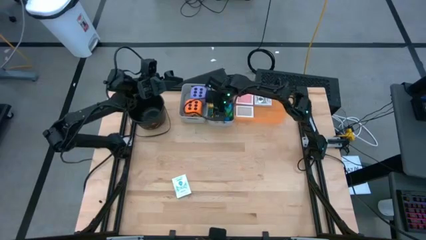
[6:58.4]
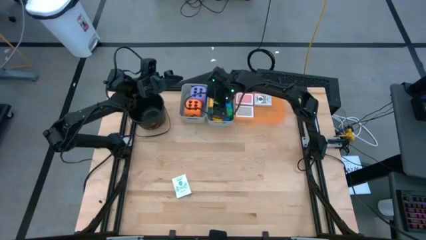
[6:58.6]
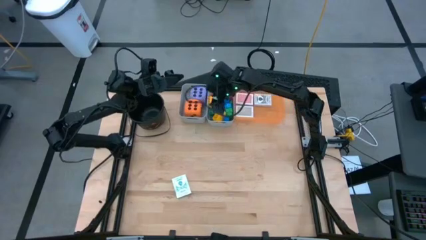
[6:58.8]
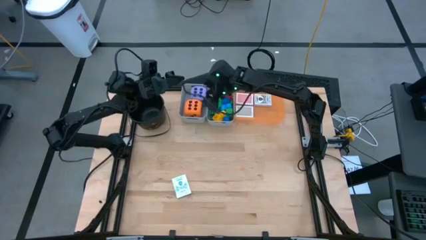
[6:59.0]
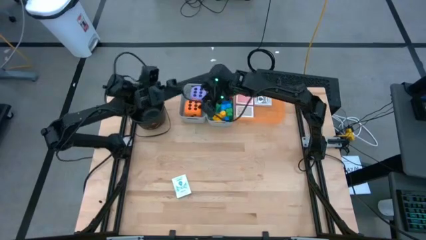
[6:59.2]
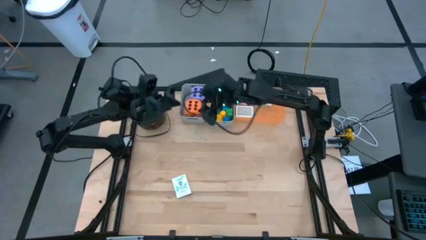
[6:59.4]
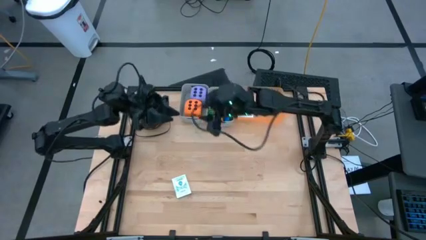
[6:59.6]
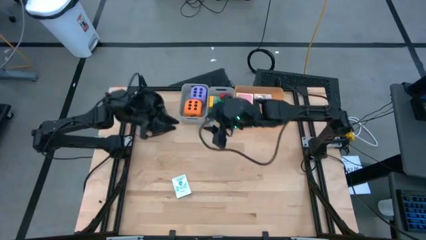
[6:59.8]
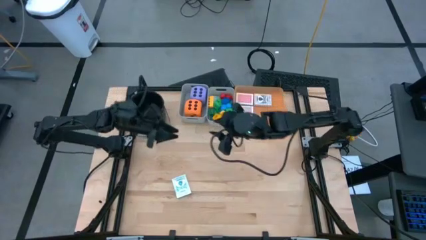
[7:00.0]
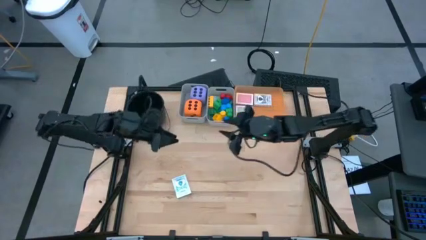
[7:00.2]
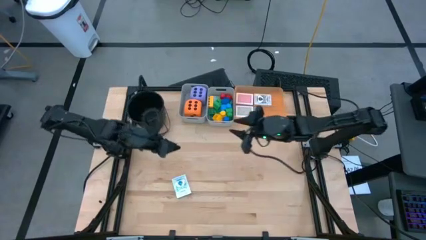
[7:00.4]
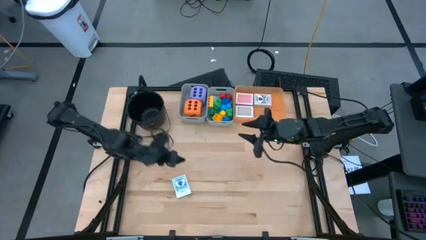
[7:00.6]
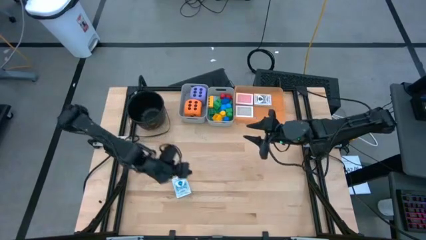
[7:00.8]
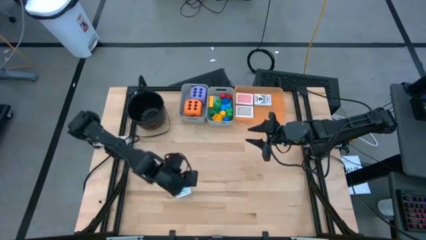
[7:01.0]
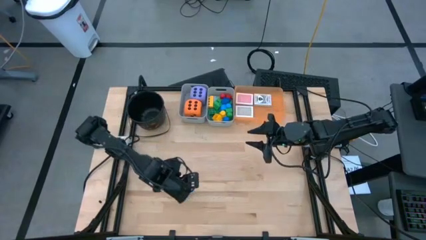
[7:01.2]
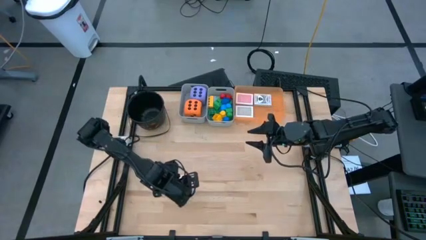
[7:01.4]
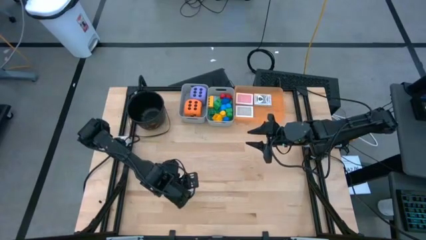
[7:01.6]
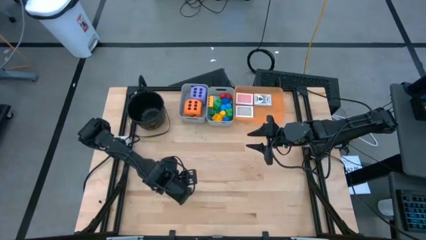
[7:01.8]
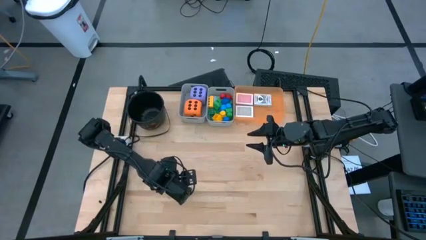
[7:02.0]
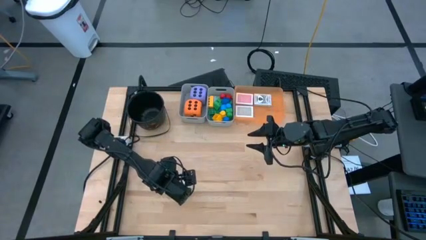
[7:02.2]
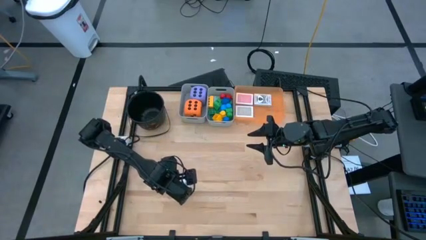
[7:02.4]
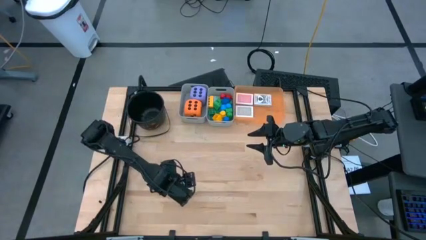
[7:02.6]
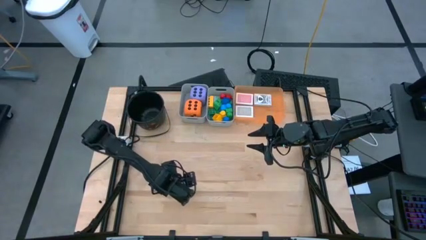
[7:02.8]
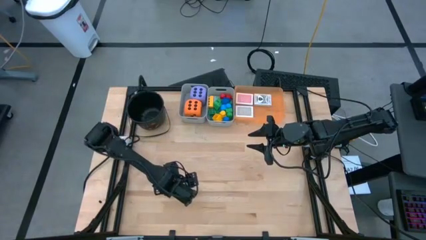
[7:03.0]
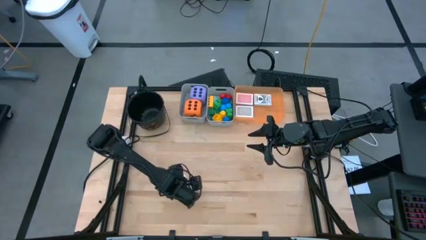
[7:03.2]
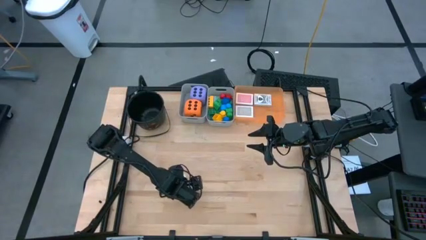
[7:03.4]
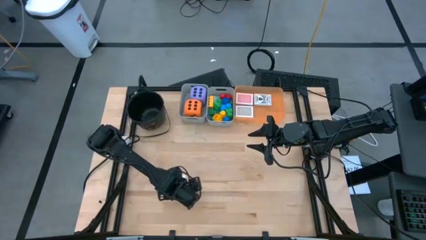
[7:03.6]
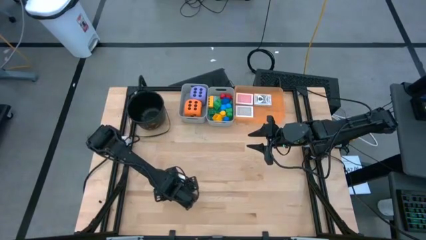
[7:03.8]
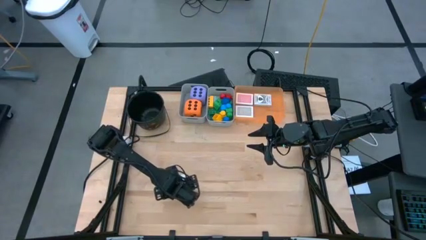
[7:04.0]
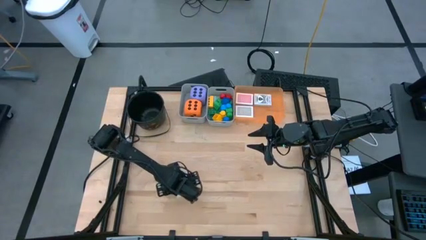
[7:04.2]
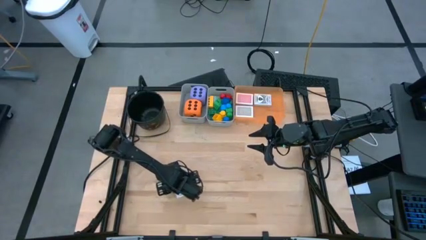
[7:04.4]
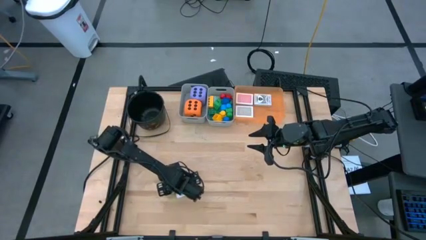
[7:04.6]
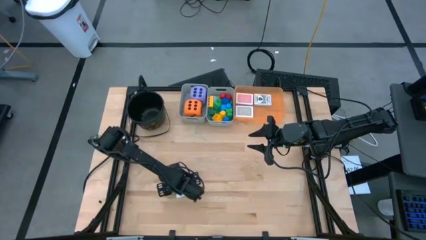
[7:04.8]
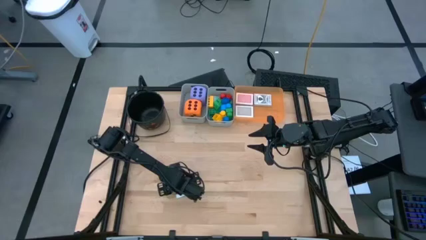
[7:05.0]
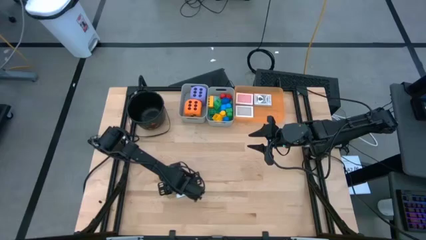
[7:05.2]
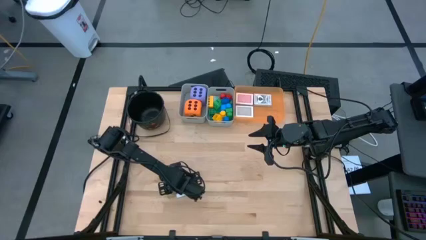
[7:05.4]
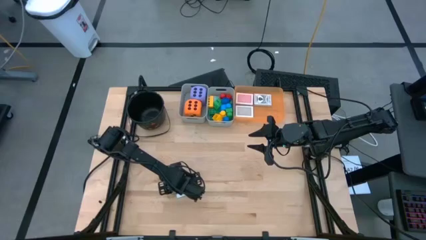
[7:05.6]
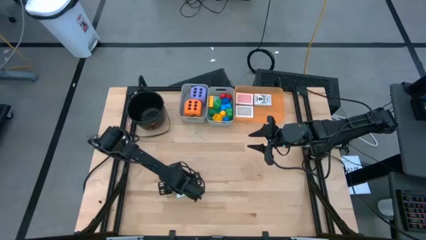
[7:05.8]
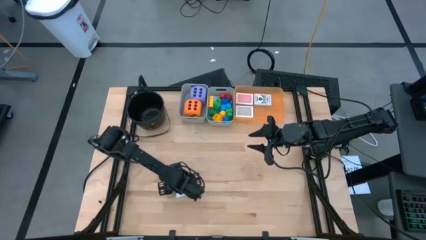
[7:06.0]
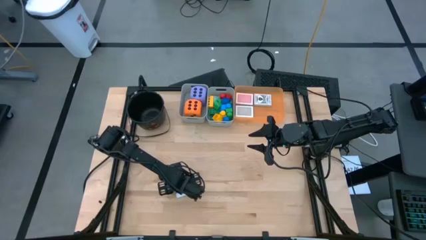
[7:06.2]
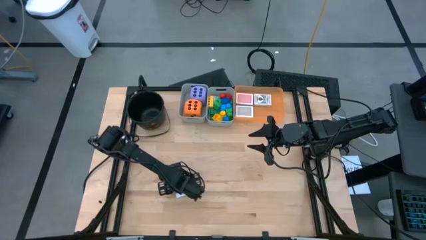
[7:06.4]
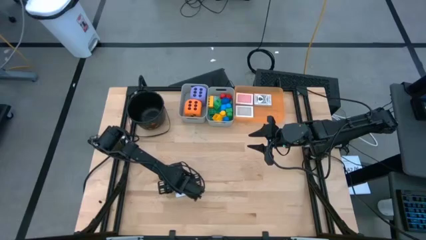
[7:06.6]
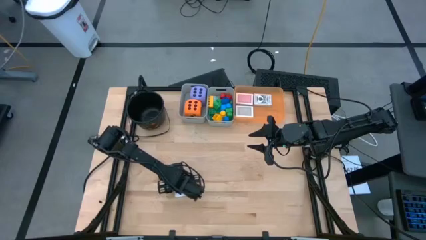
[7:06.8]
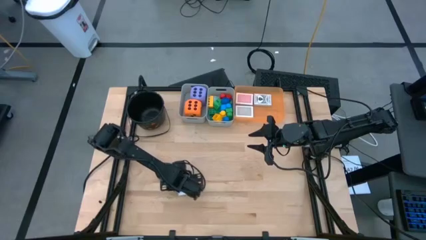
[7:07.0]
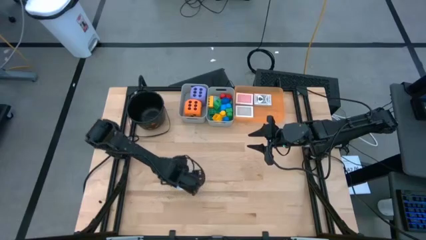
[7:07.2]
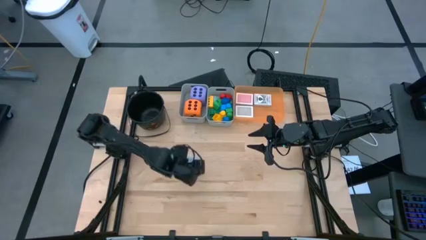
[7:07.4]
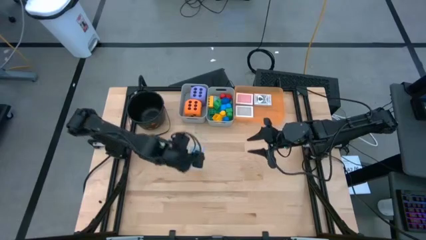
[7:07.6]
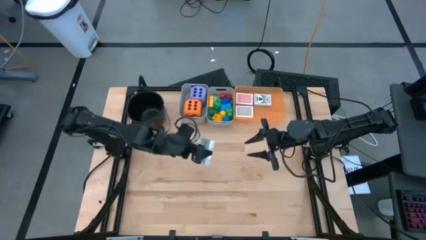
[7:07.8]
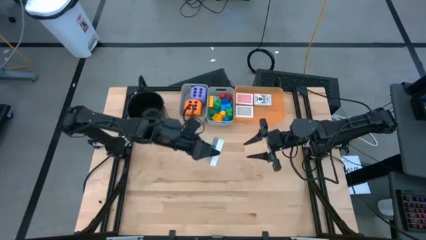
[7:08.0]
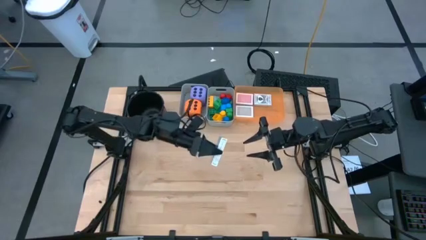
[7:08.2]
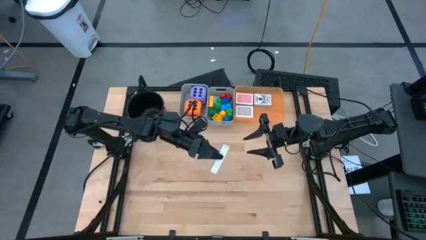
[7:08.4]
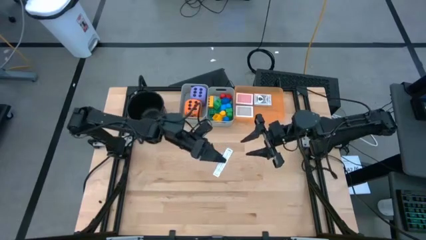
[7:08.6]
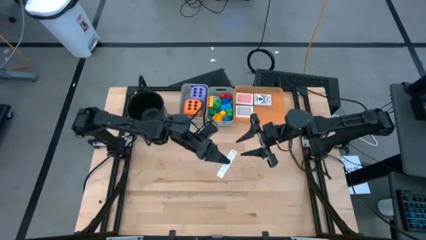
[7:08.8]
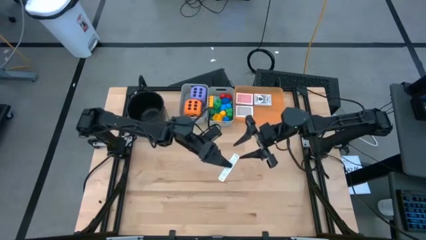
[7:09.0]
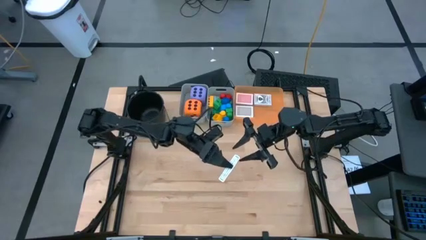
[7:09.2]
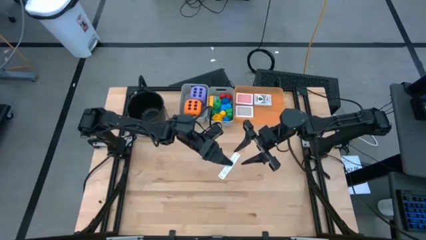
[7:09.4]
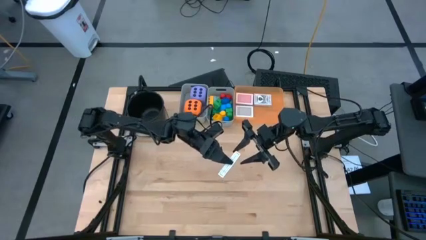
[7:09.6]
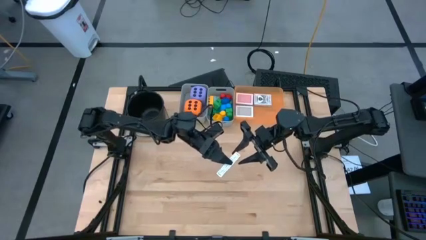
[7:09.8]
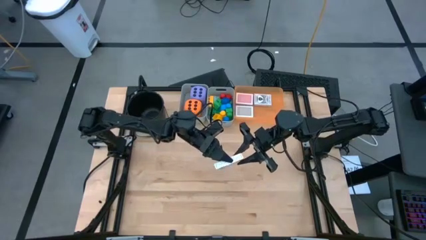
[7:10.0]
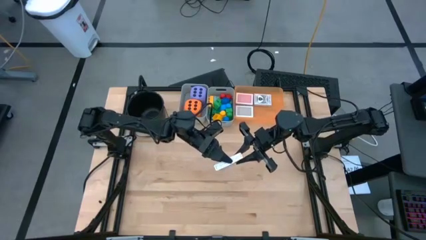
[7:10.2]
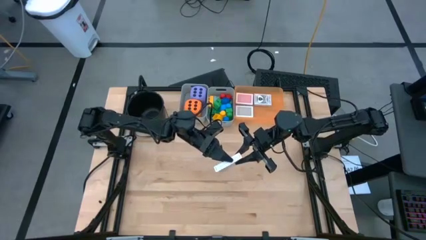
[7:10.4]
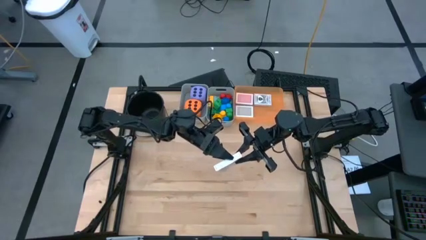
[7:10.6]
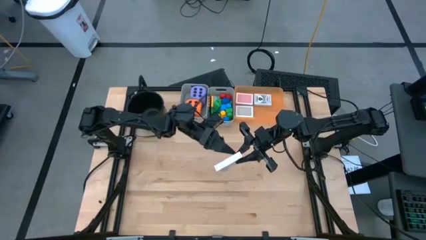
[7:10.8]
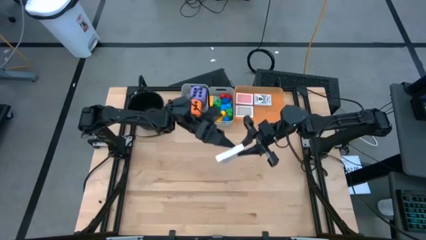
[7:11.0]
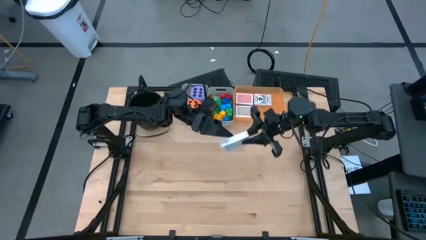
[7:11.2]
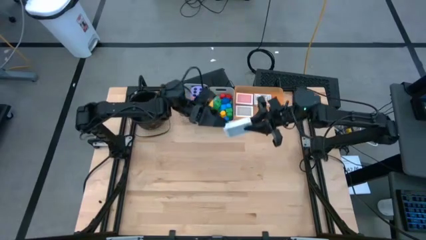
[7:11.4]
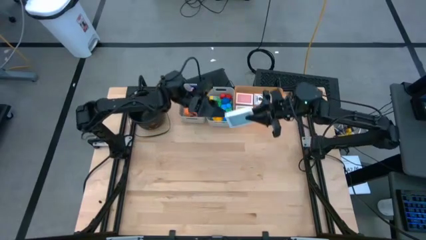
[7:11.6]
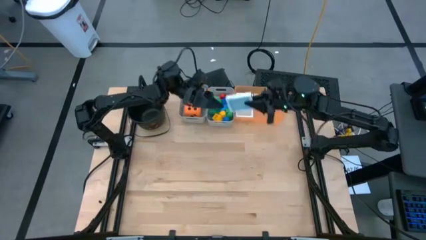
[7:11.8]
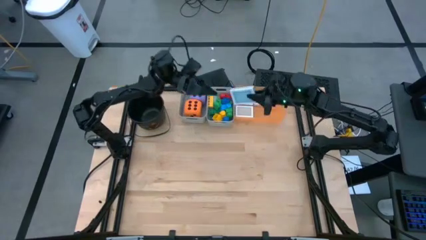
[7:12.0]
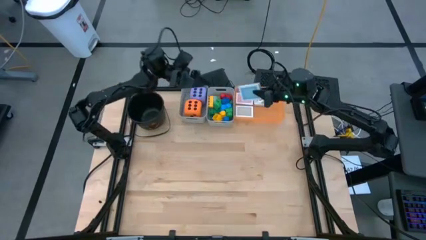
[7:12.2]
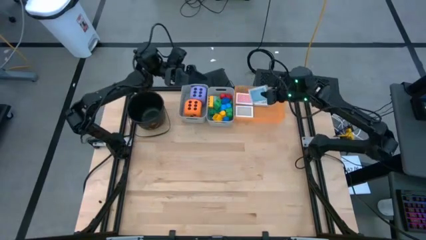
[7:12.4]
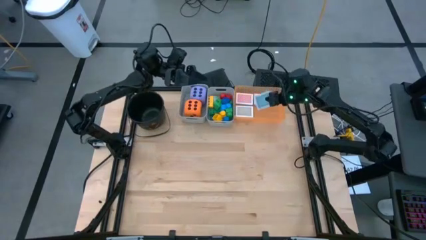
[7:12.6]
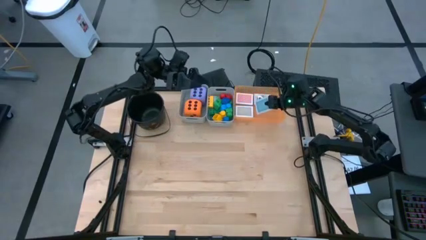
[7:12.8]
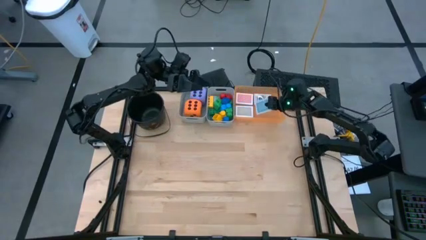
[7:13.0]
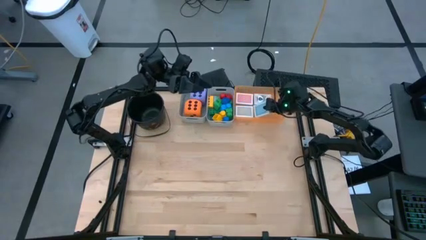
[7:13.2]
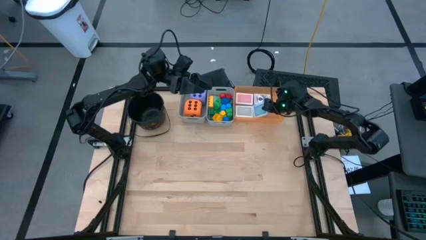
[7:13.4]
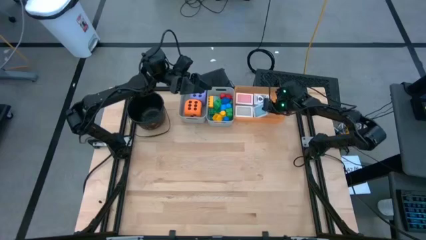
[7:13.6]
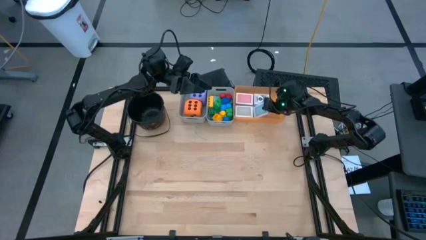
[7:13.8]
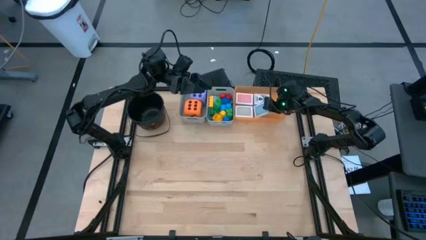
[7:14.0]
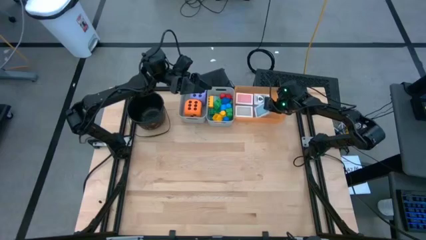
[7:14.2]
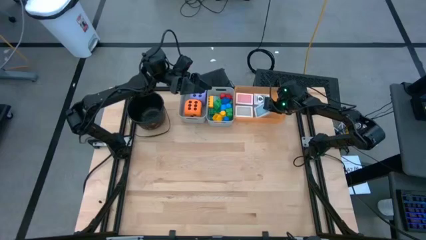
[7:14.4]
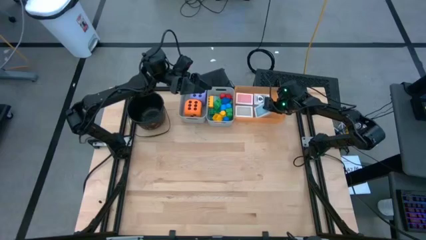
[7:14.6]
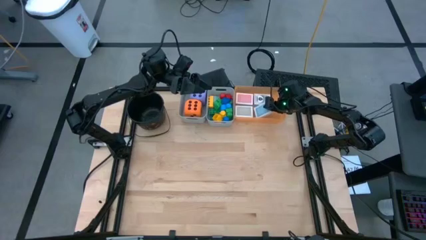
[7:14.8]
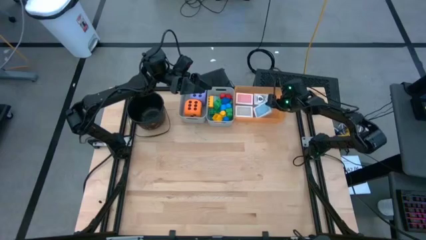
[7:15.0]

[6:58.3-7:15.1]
Task: Pick & Place Toys
Put the blue playing card into the orange bin
